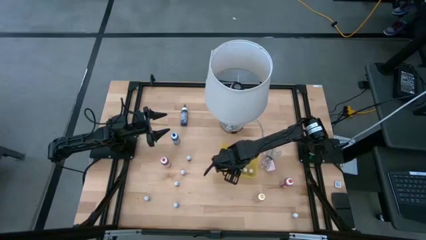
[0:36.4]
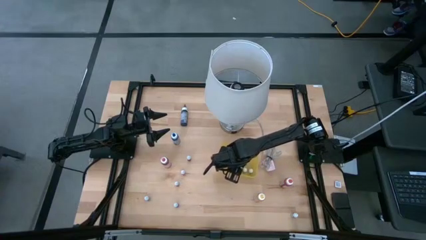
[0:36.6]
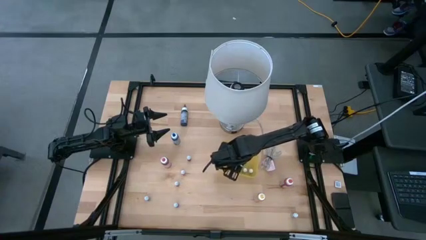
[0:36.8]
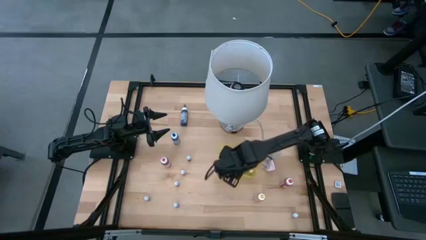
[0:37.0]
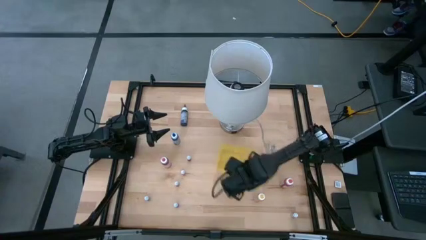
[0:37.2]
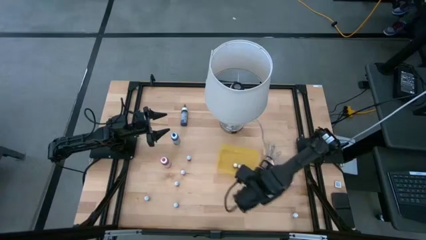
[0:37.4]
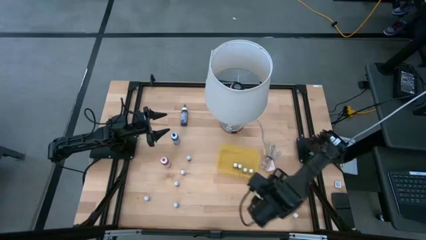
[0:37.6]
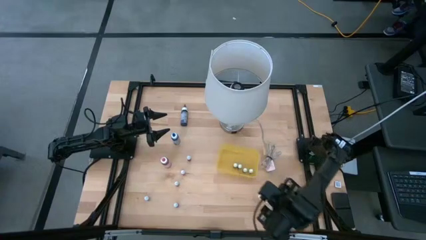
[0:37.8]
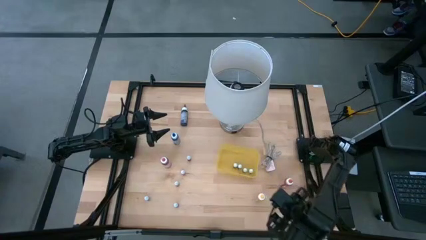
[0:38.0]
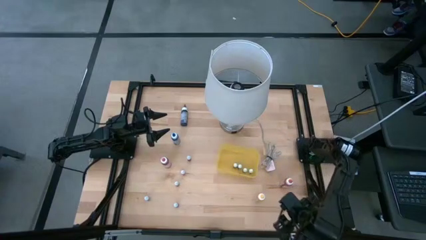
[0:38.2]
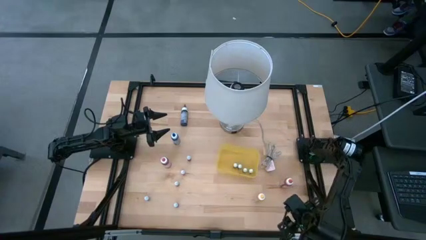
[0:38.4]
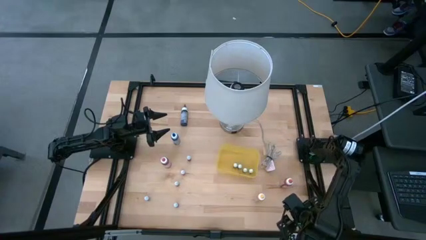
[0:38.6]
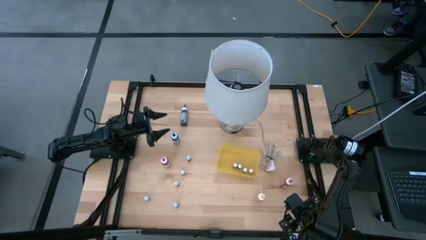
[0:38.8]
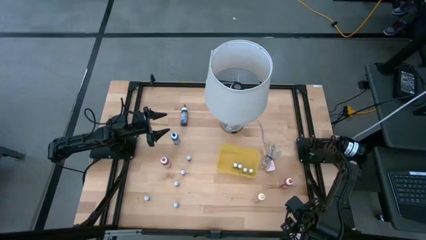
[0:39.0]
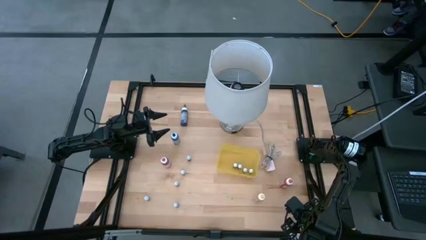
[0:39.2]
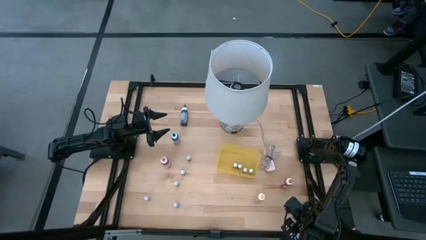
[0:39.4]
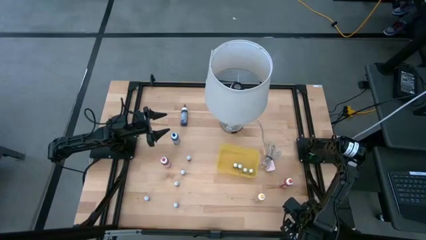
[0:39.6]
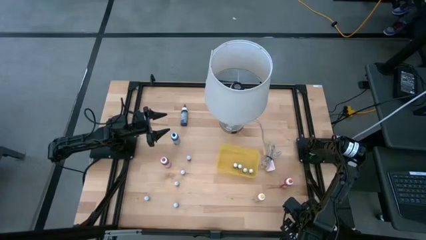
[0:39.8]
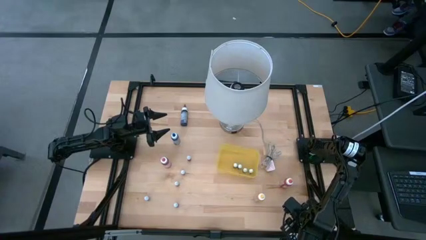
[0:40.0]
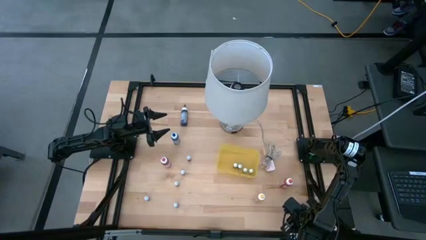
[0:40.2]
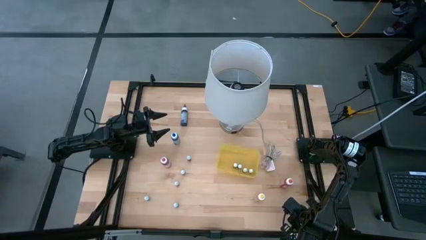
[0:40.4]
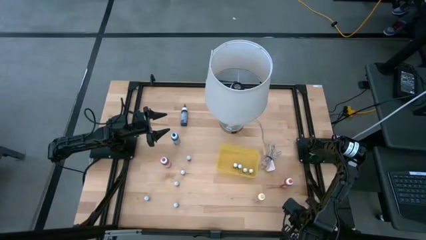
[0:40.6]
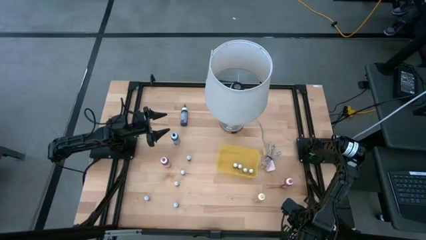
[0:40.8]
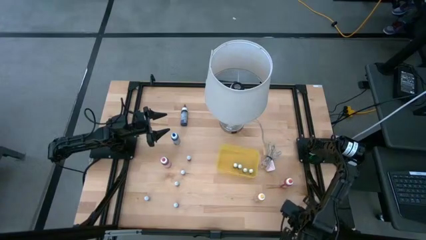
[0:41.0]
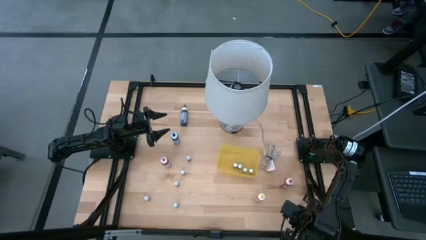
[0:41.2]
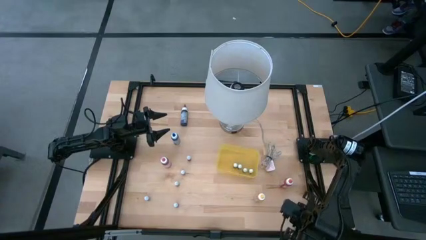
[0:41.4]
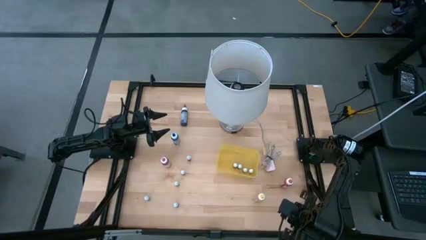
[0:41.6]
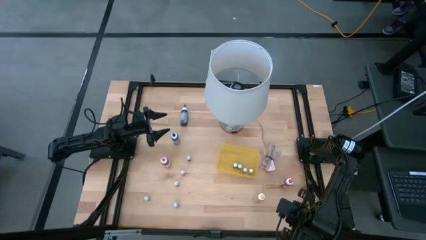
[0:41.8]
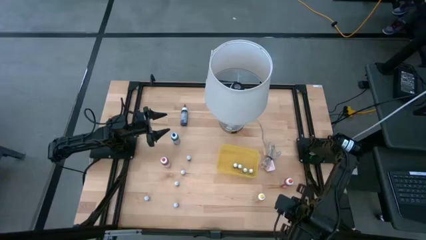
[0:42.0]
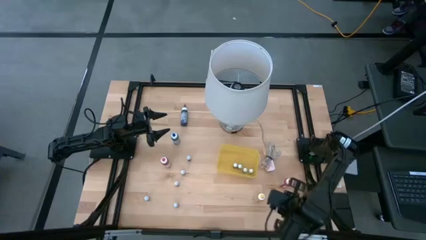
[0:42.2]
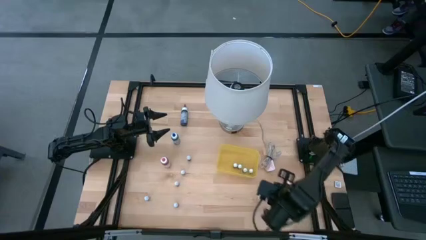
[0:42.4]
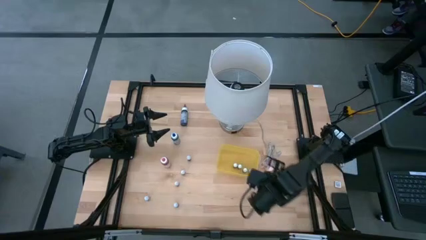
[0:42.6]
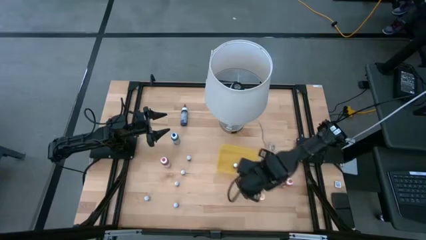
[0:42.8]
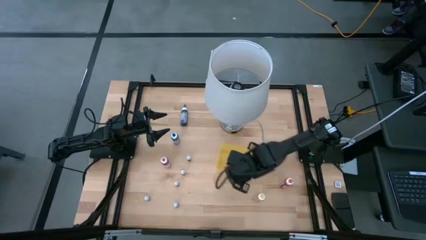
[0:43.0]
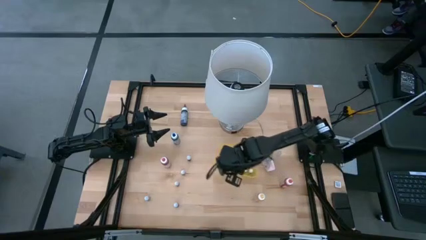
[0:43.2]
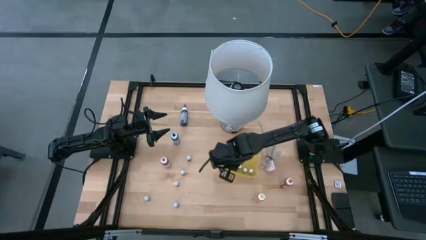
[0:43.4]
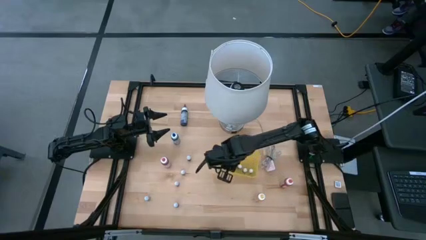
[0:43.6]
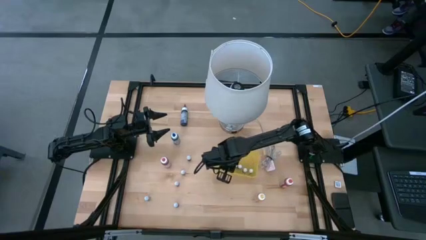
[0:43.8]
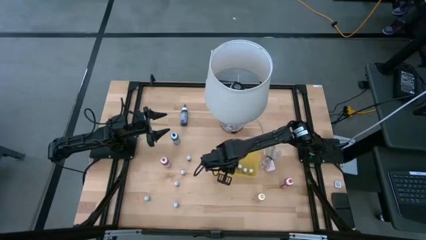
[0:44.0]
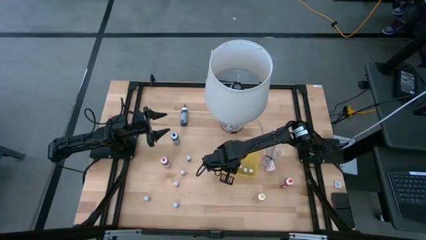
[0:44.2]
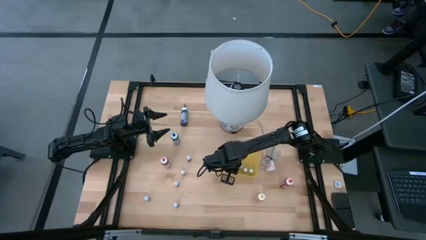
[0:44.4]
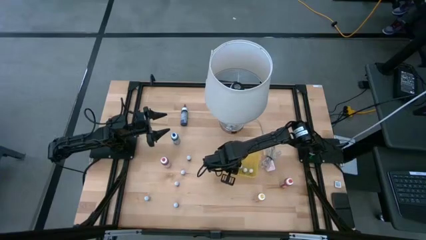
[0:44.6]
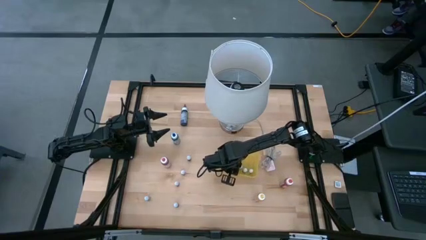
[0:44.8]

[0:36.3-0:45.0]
Task: Pick & Place food coloring
Put the pink food coloring bottle into the yellow bin

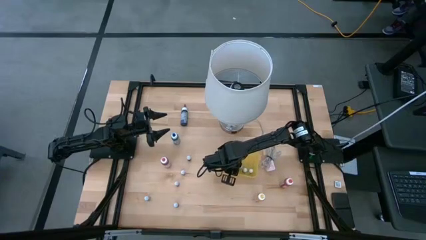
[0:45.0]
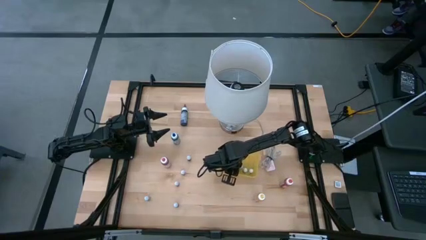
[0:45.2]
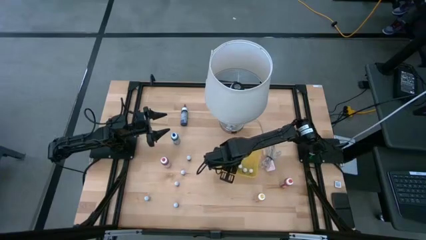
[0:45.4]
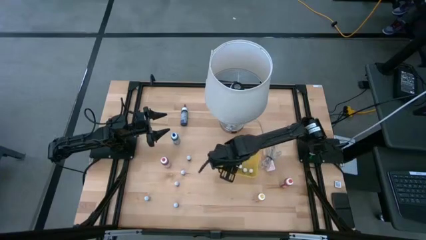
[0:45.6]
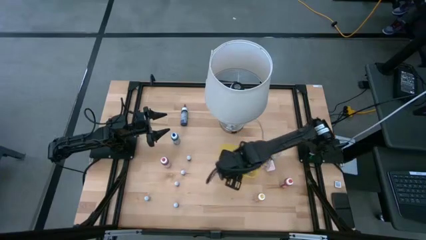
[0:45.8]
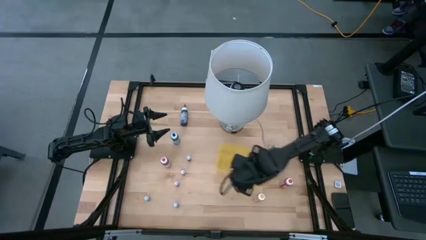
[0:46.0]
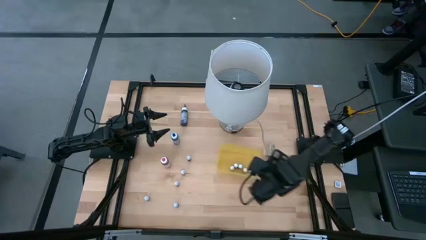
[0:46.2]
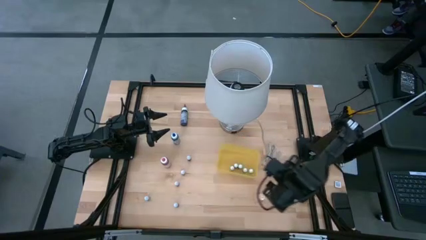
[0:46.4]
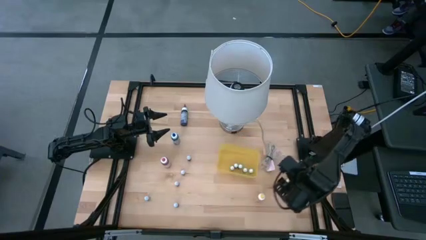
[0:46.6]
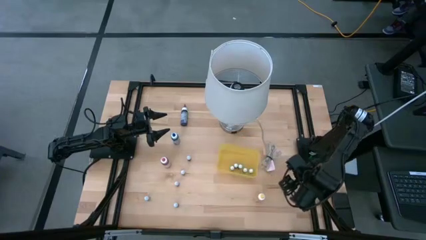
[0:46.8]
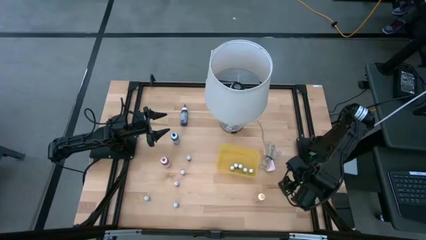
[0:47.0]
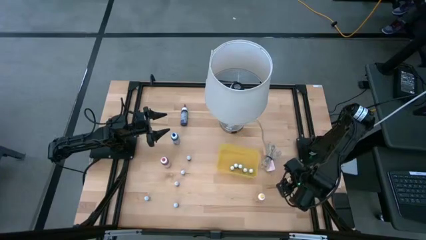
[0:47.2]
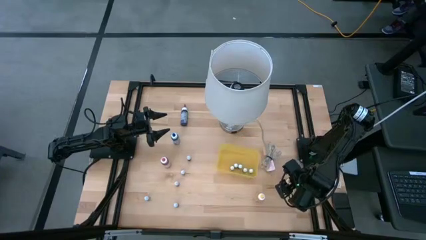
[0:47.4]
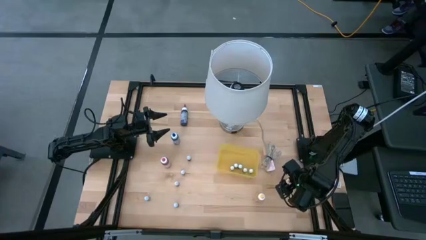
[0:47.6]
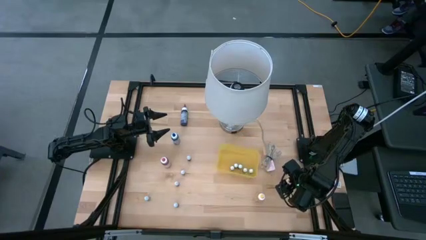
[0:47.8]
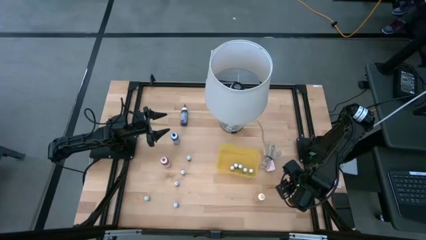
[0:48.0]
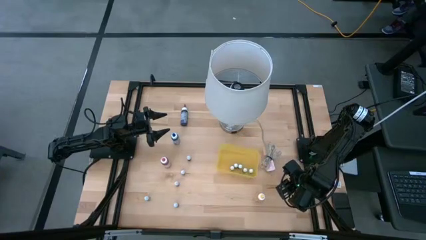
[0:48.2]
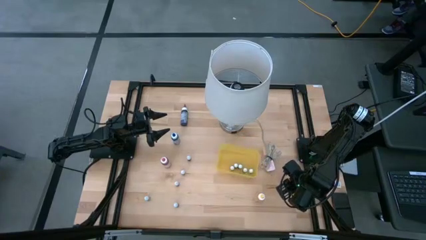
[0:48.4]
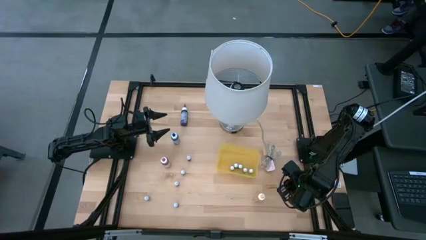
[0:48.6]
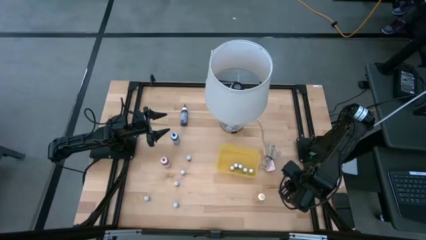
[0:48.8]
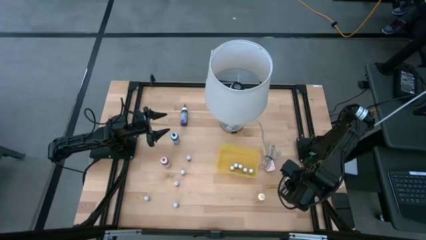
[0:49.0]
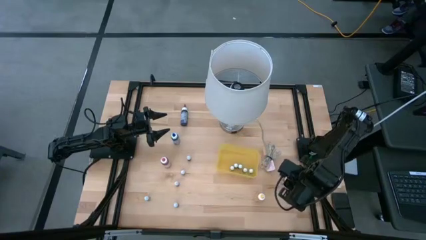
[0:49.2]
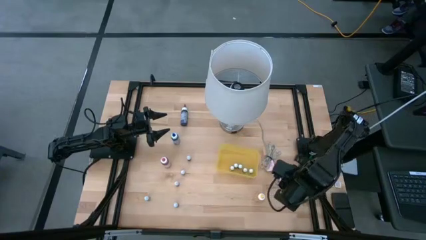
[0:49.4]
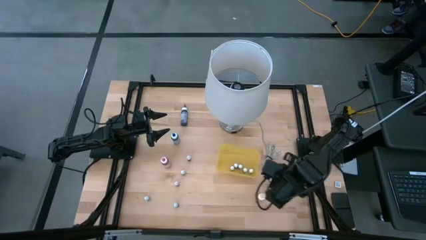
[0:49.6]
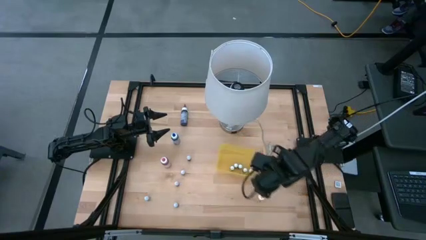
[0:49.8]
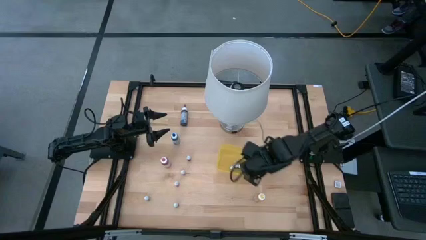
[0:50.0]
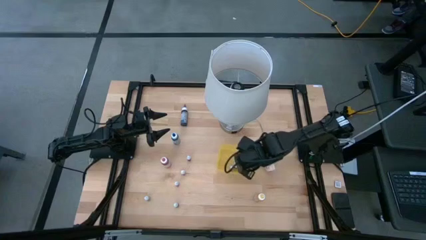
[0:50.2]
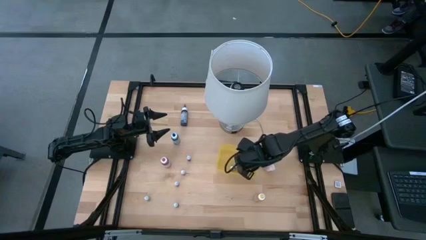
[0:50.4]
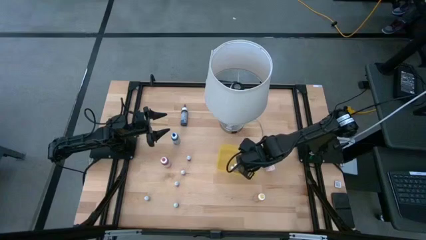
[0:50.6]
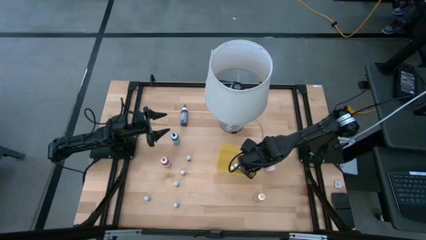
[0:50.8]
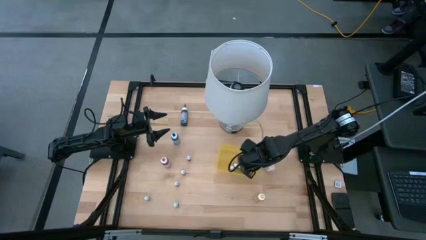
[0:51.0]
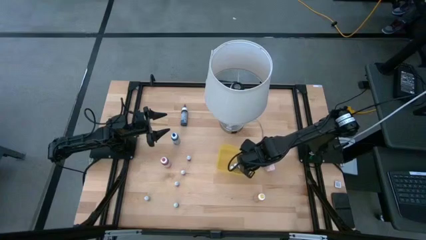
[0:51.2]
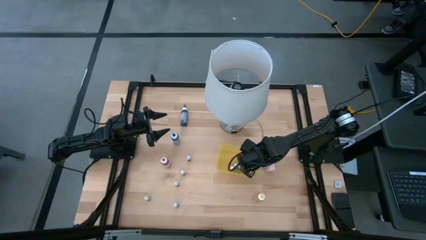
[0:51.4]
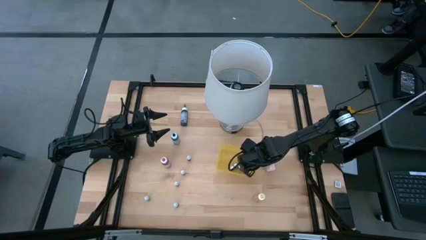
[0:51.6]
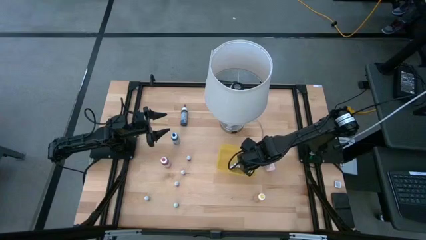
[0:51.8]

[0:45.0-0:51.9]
Put the orange food coloring bottle into the yellow bin

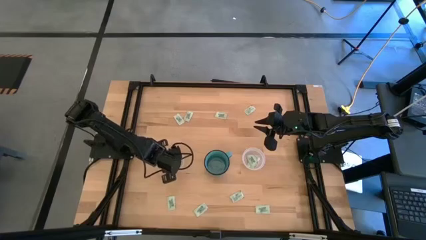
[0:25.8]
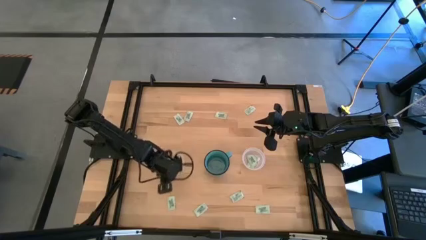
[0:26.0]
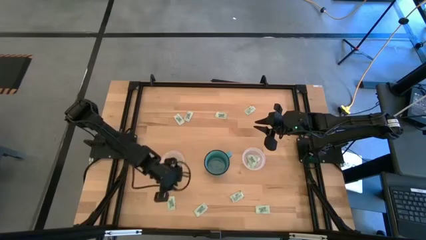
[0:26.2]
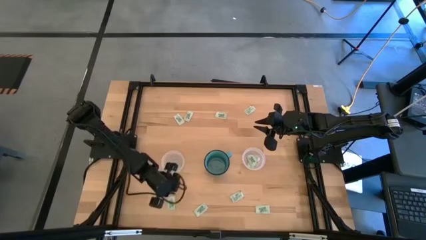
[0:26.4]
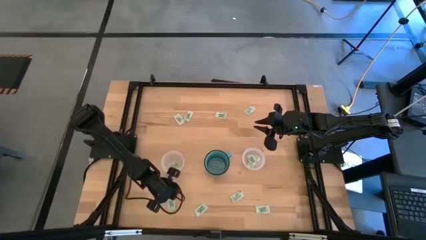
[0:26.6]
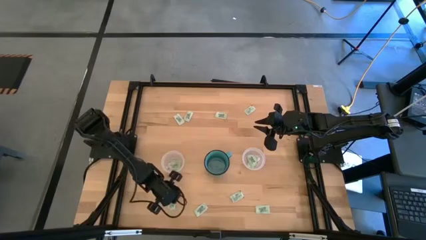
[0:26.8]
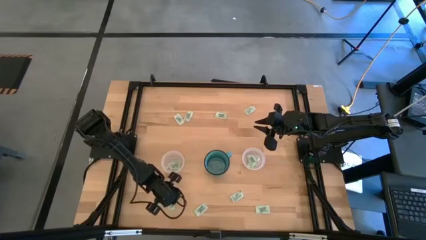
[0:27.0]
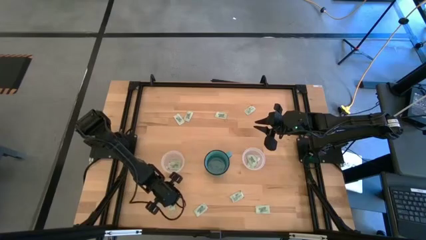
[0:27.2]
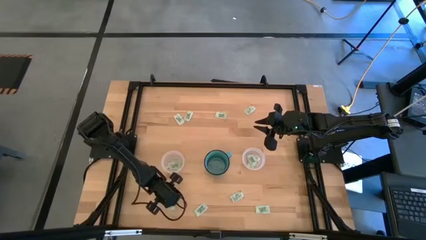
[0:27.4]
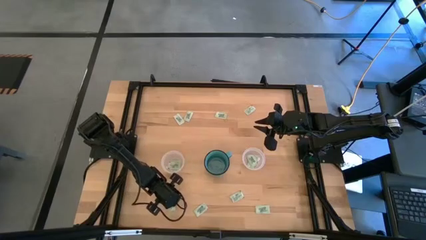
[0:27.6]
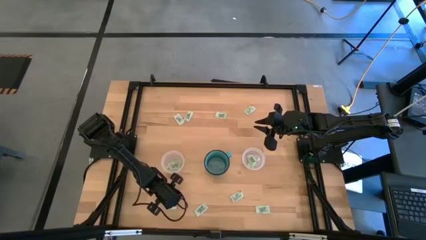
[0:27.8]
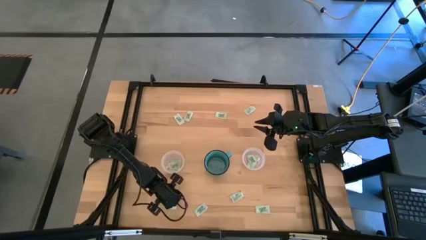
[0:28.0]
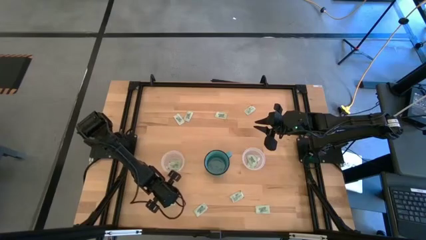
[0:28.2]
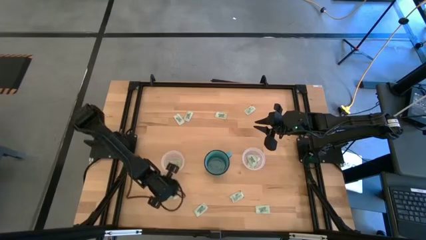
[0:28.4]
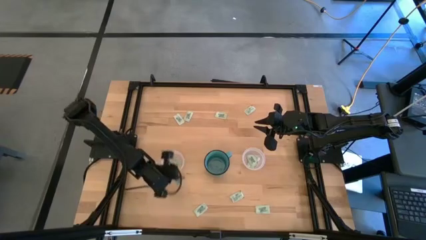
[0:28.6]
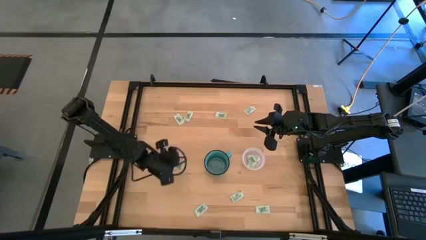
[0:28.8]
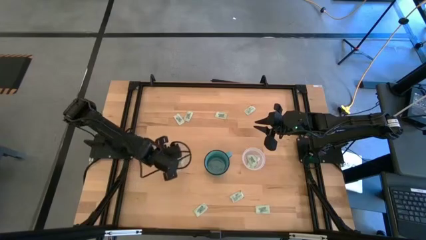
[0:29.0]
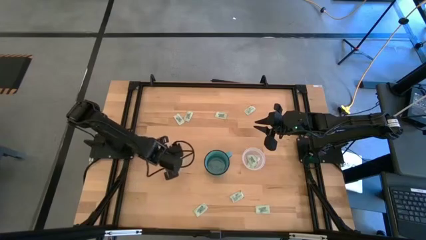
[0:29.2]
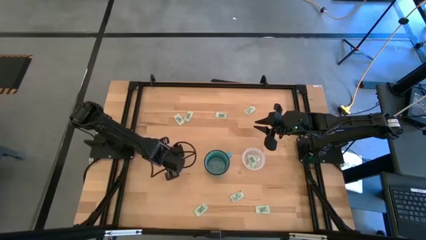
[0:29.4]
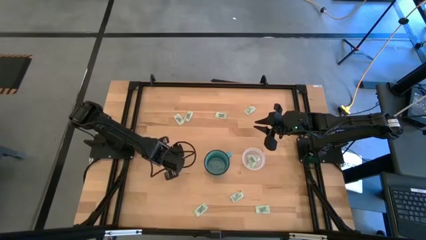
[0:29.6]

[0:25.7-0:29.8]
Task: Pick and place Stevia / Truvia into bins
Put the green stevia packet into the left transparent container
